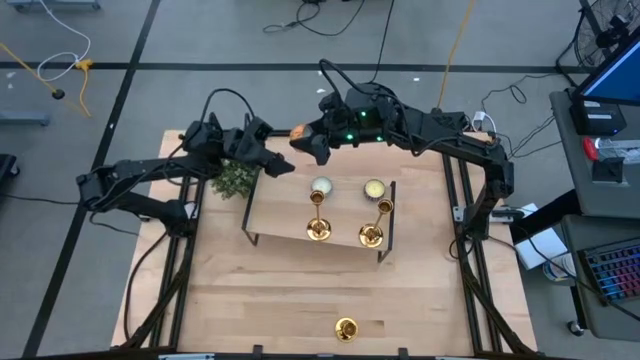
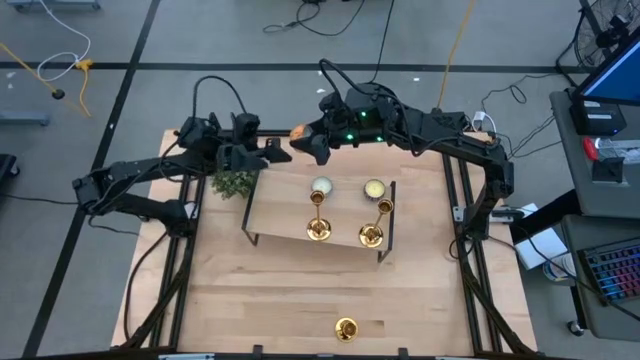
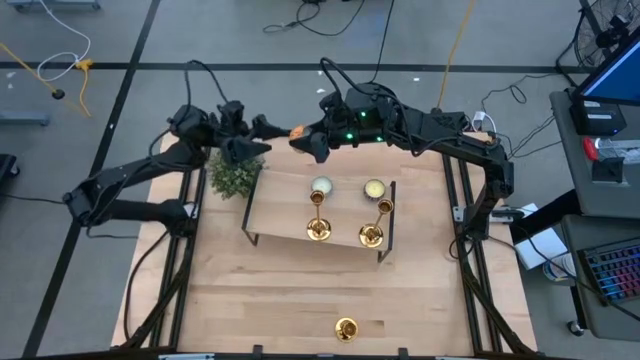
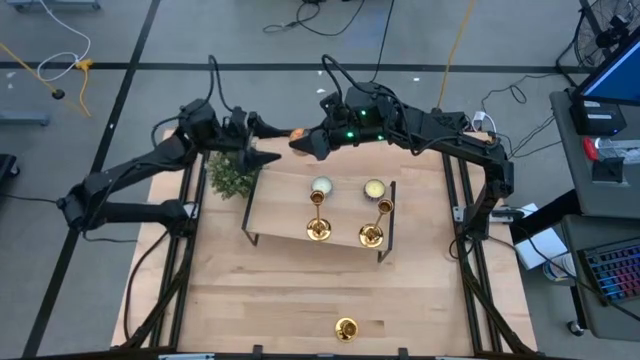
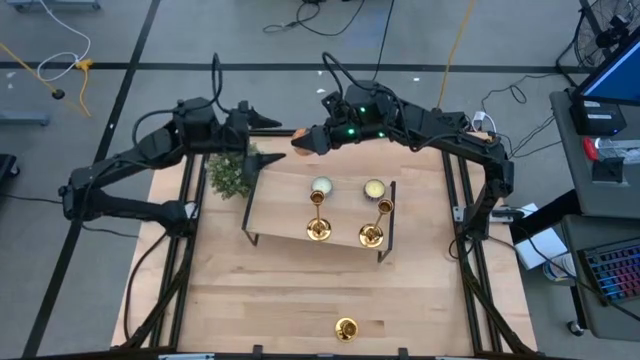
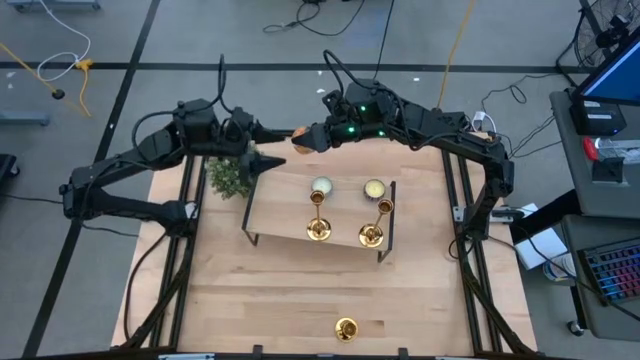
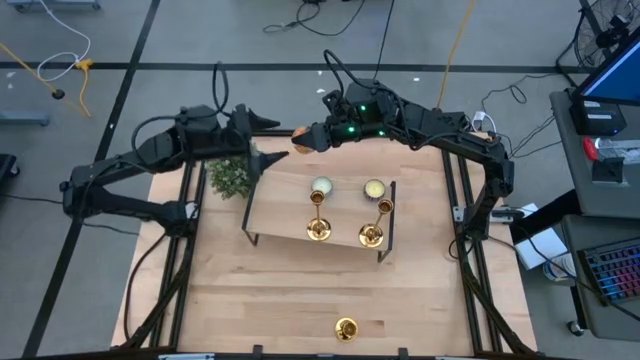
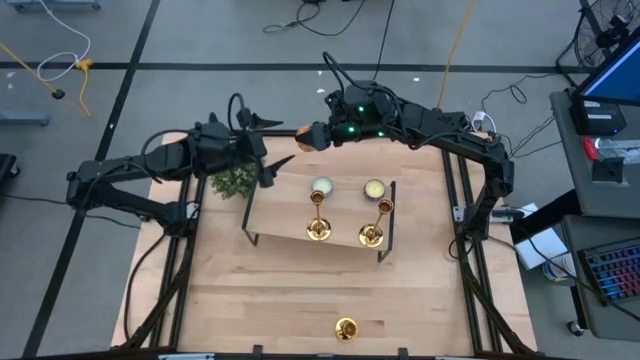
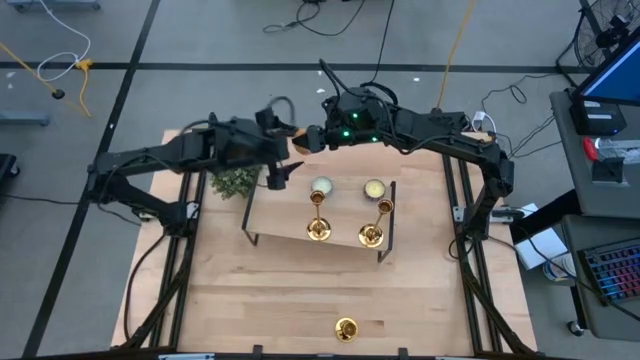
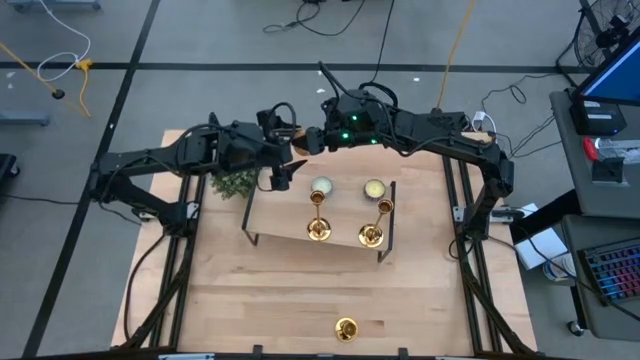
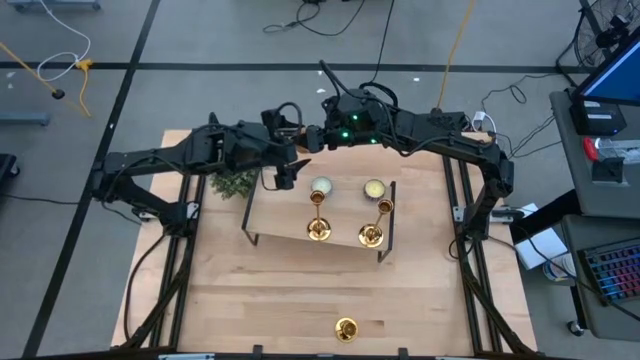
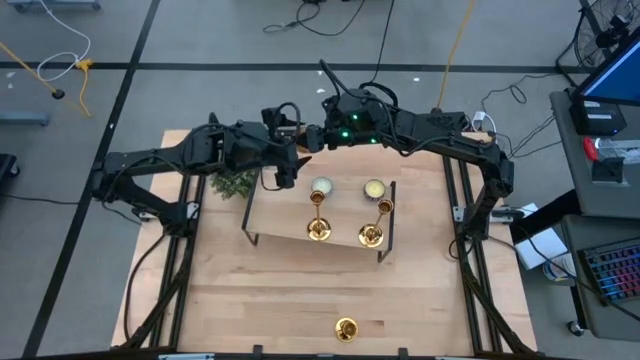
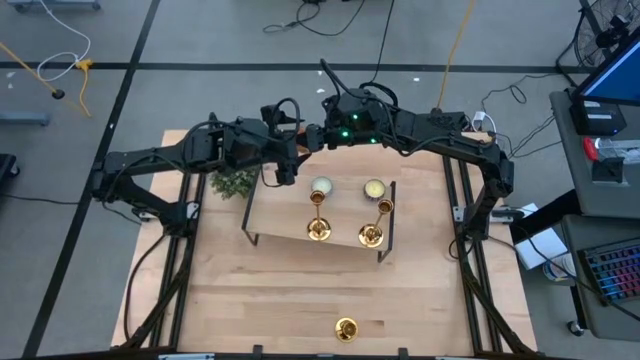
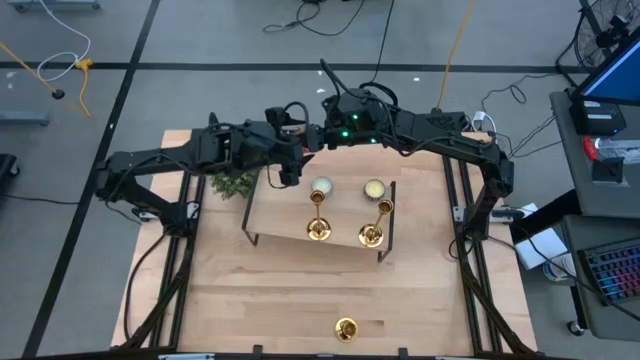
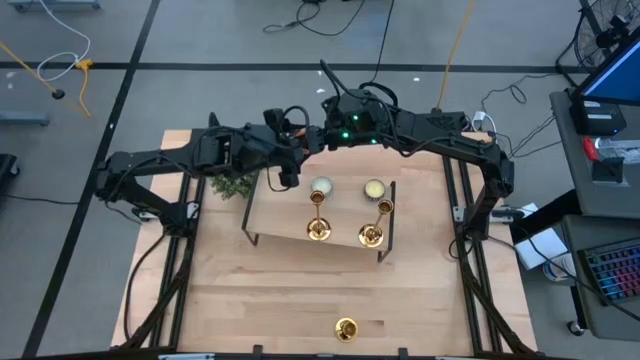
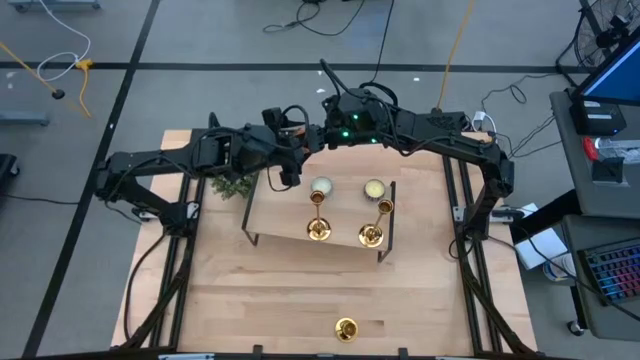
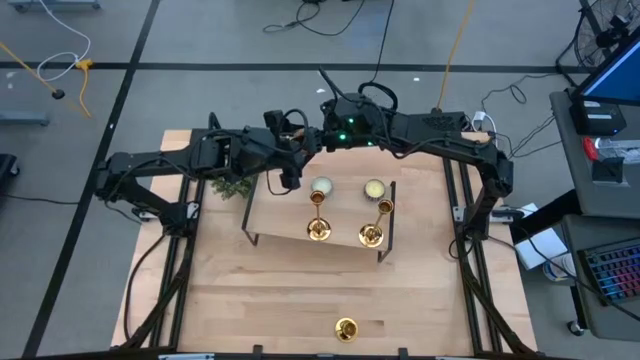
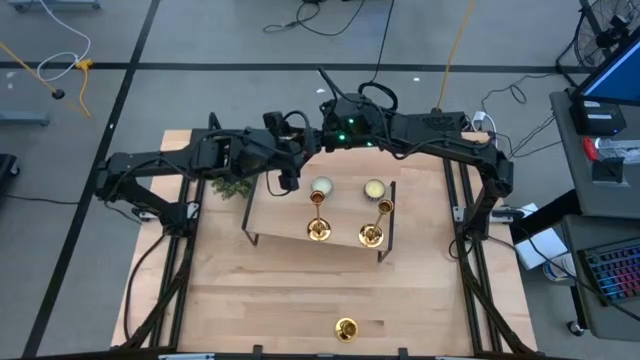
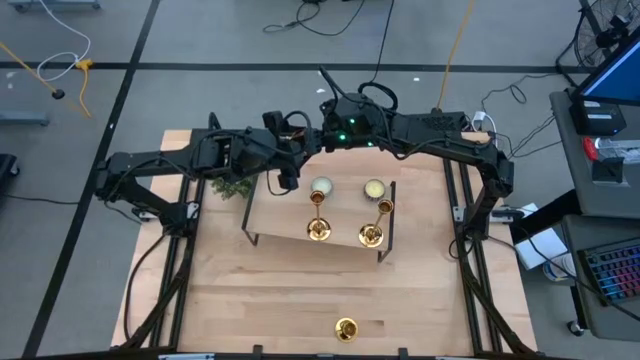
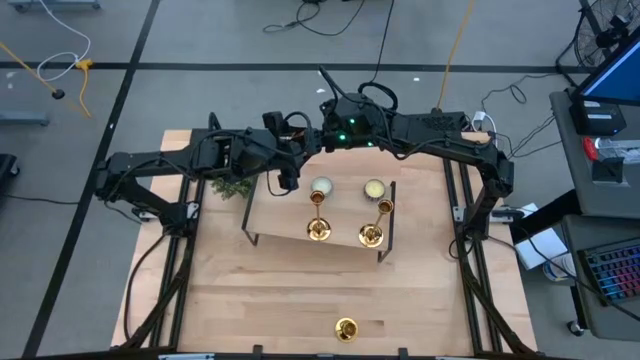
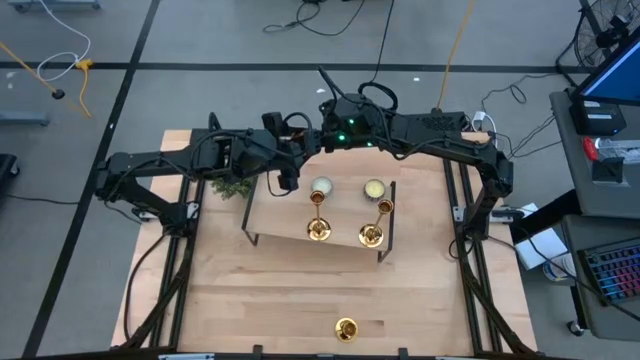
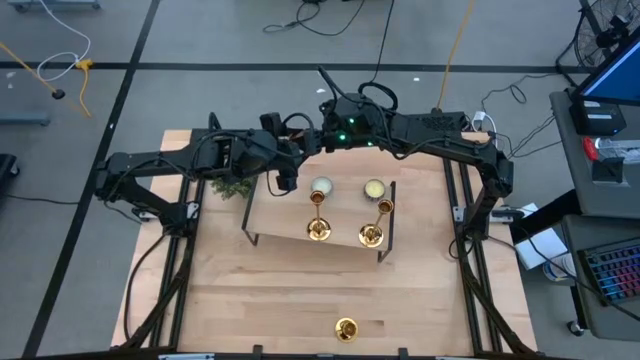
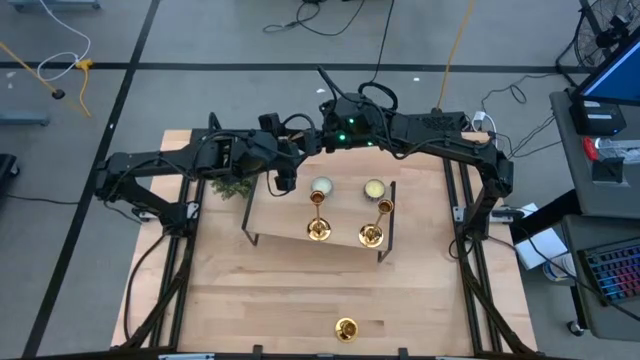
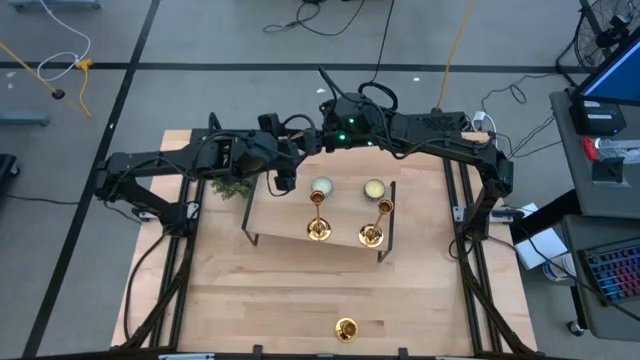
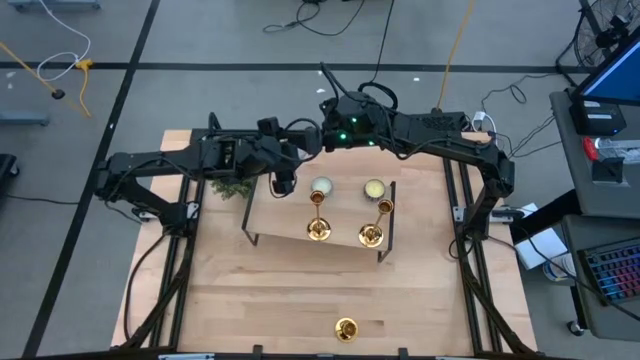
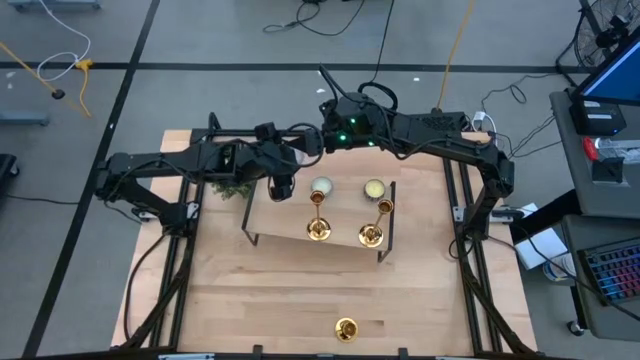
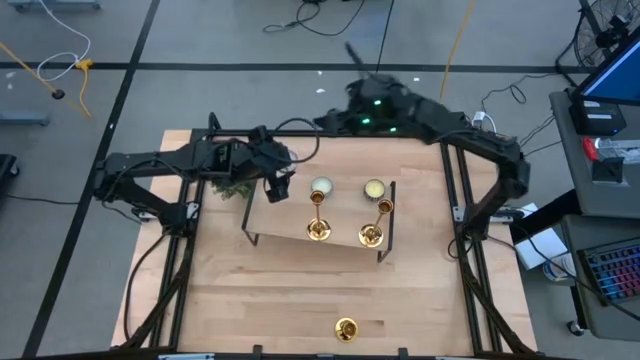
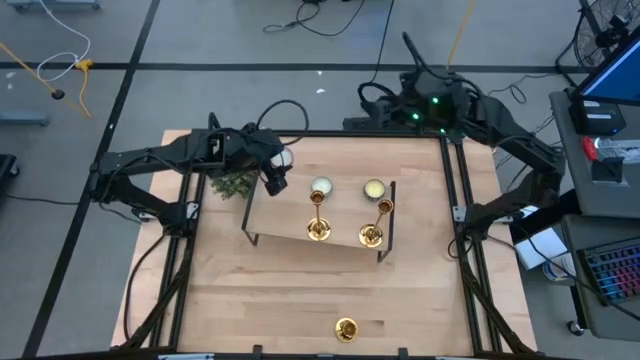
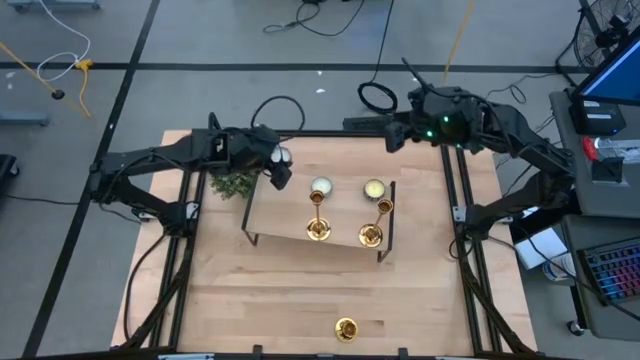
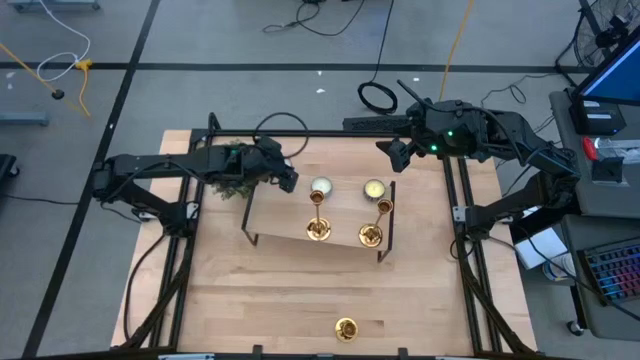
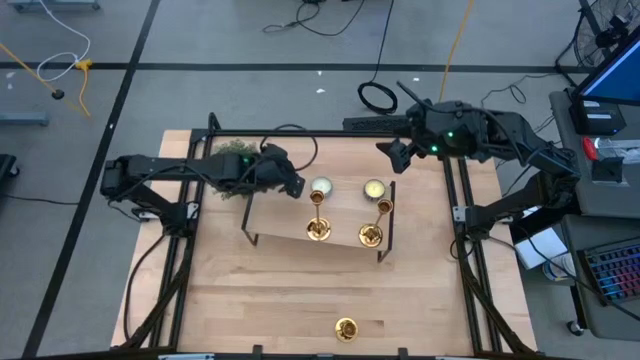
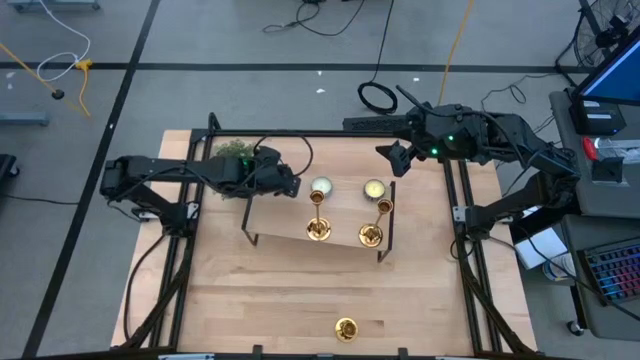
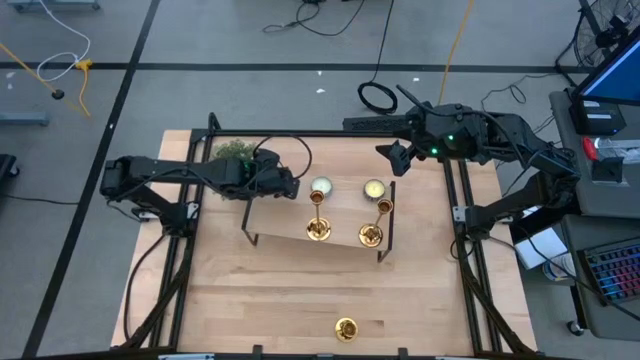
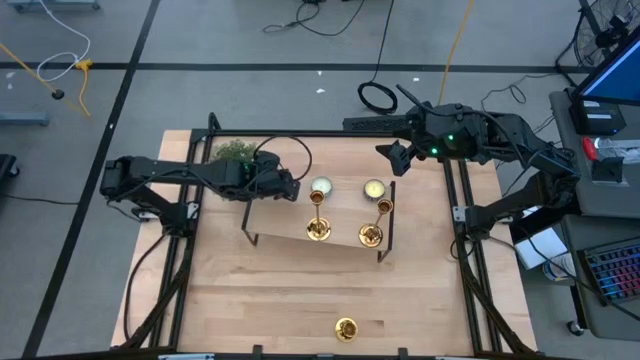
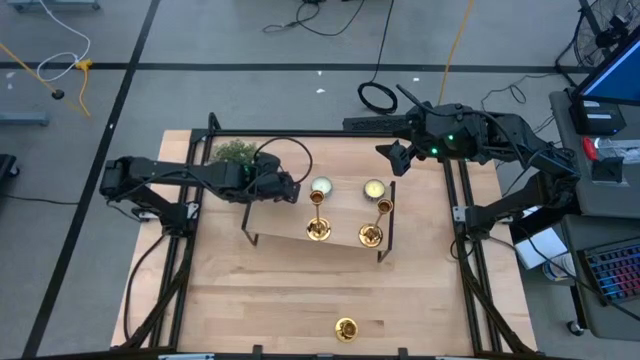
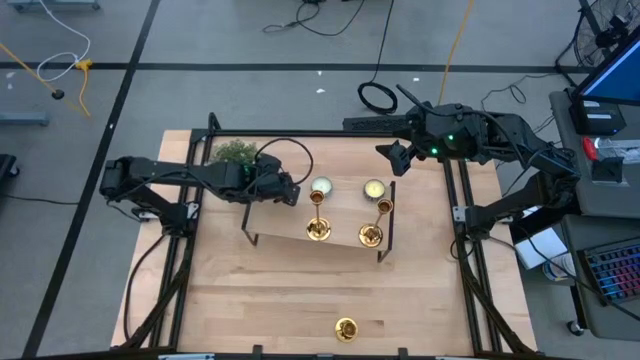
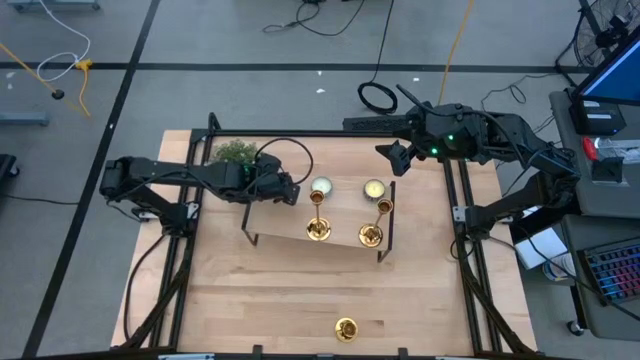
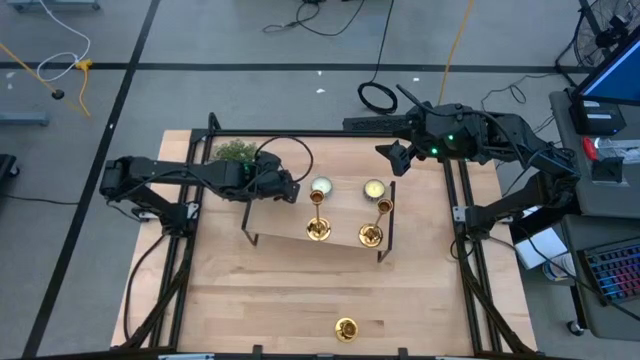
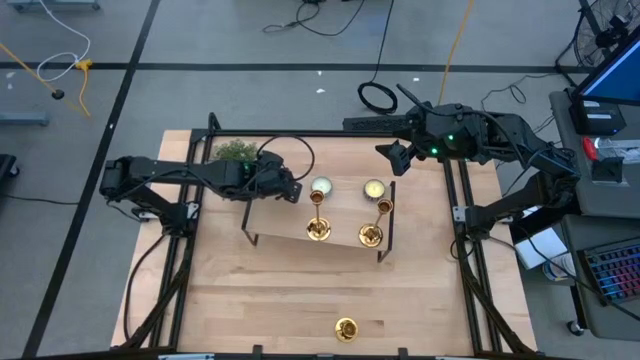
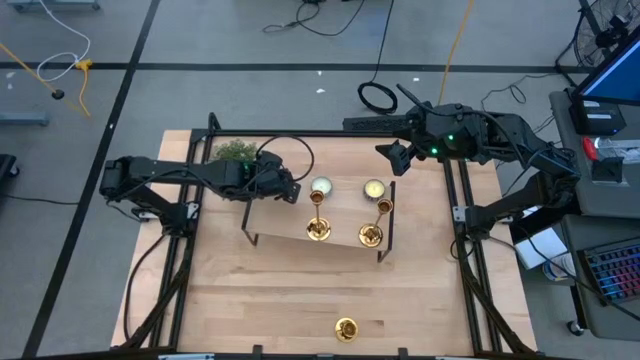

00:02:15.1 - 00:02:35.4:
Task: Pick & Place candle stick holders
Put the scented candle on the shelf
